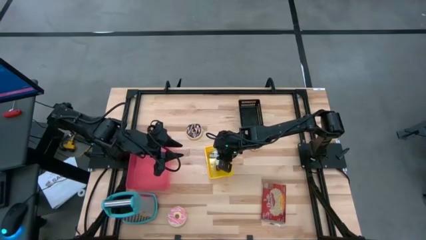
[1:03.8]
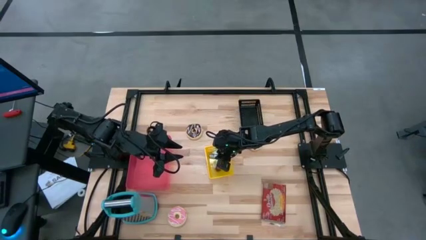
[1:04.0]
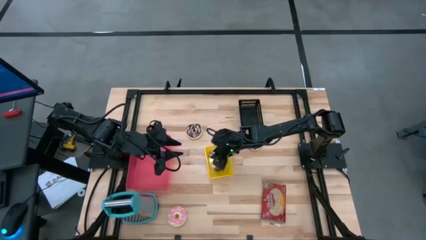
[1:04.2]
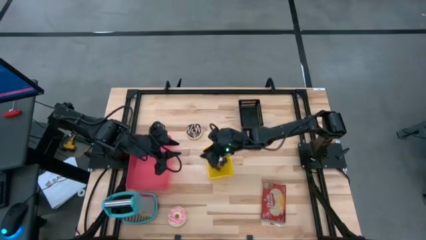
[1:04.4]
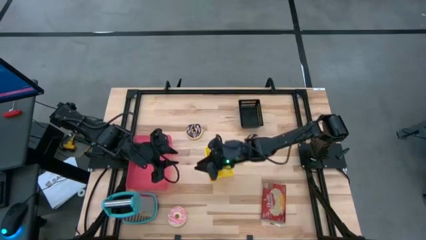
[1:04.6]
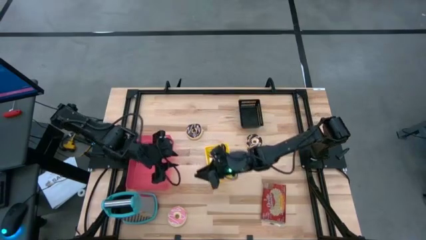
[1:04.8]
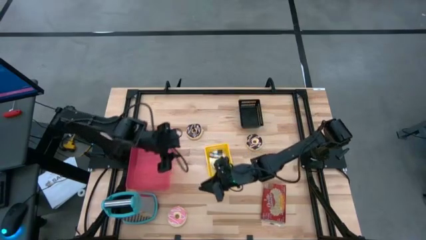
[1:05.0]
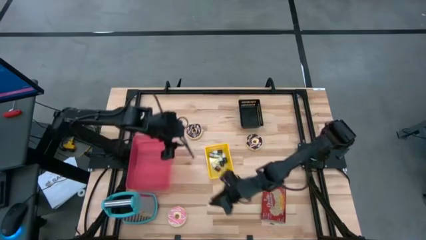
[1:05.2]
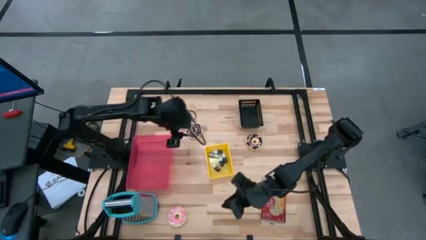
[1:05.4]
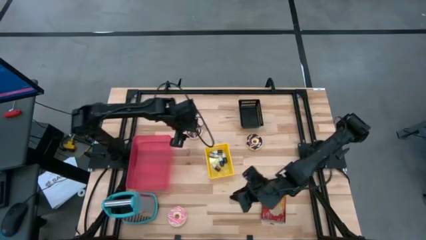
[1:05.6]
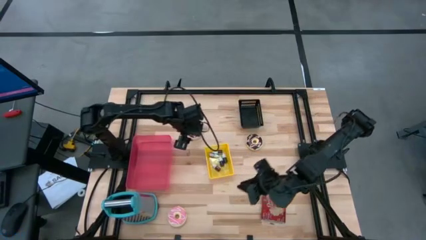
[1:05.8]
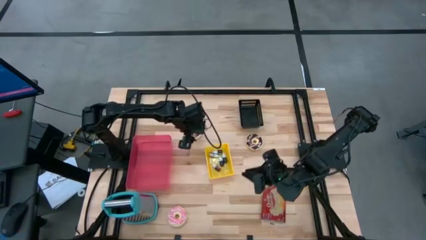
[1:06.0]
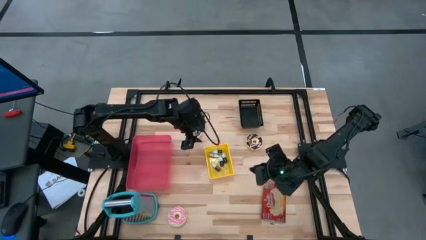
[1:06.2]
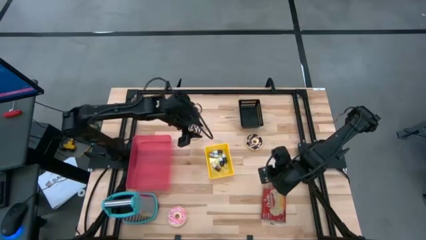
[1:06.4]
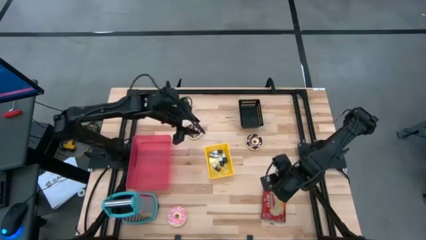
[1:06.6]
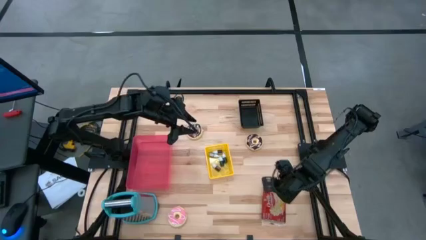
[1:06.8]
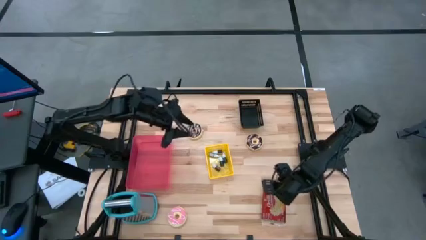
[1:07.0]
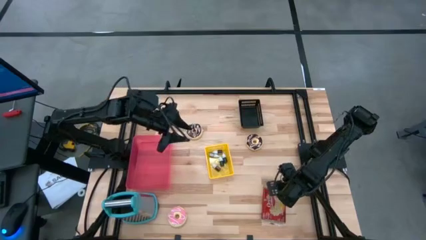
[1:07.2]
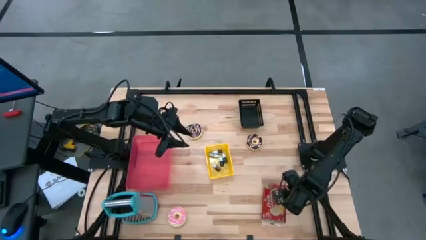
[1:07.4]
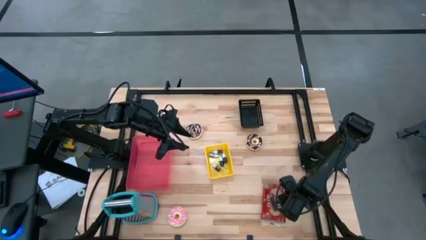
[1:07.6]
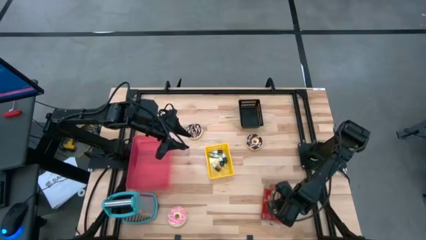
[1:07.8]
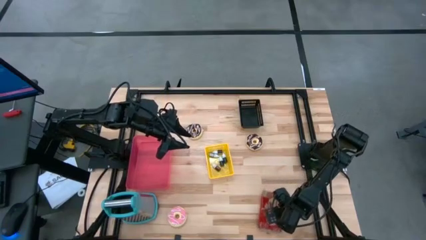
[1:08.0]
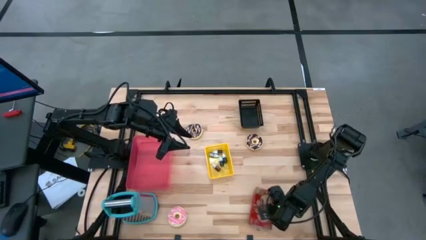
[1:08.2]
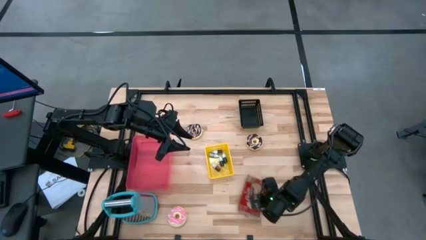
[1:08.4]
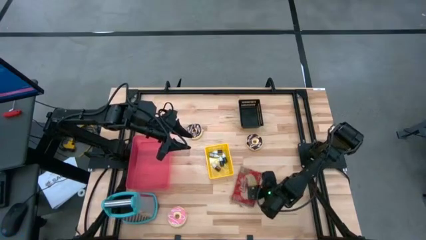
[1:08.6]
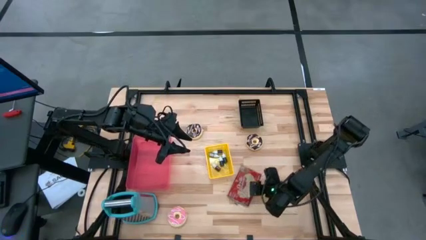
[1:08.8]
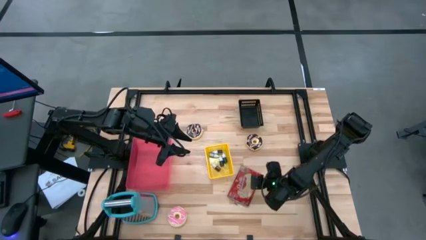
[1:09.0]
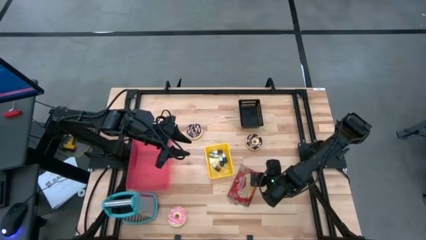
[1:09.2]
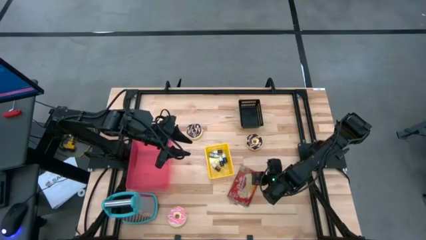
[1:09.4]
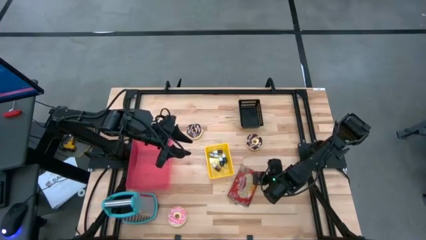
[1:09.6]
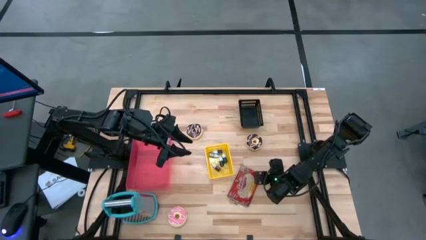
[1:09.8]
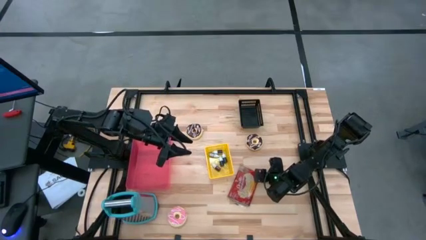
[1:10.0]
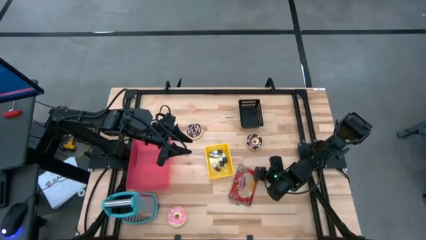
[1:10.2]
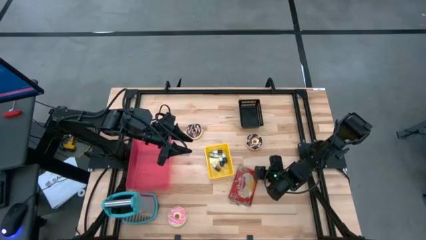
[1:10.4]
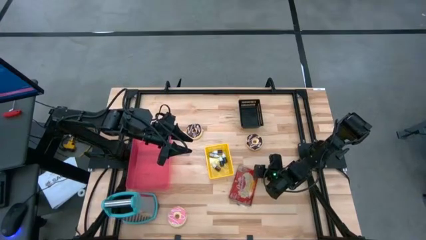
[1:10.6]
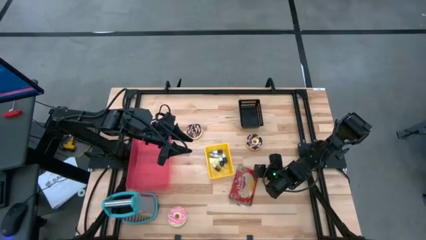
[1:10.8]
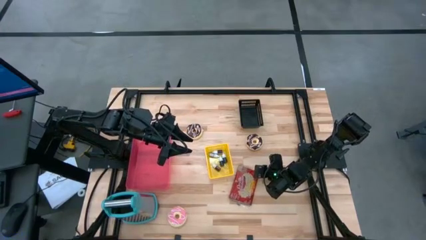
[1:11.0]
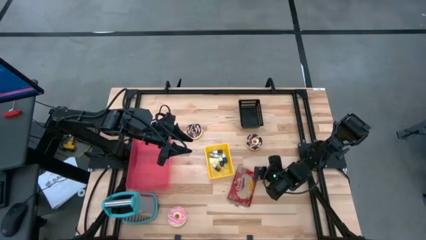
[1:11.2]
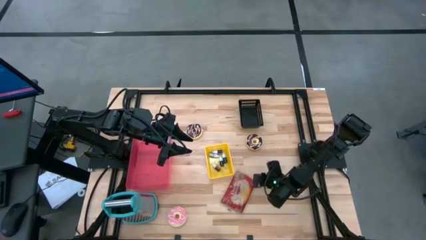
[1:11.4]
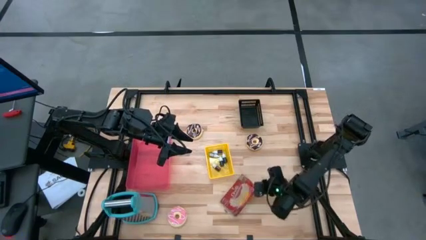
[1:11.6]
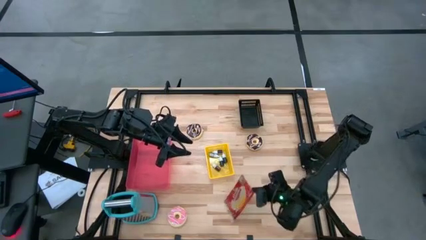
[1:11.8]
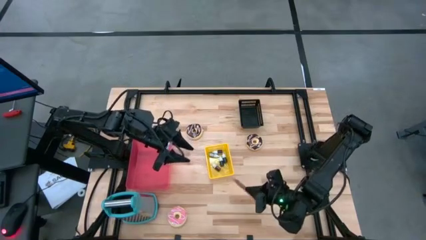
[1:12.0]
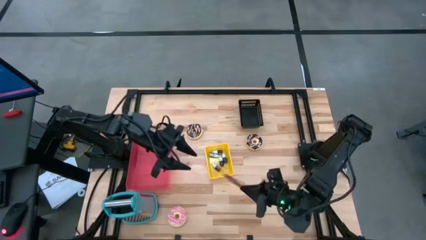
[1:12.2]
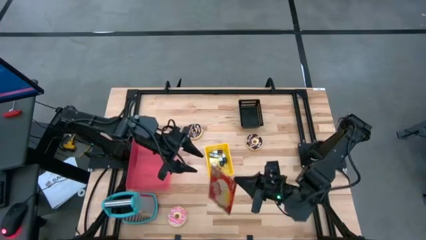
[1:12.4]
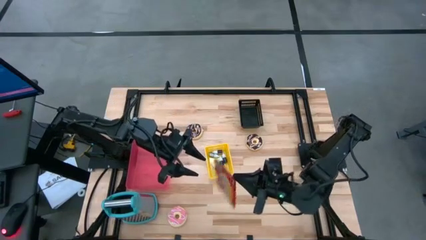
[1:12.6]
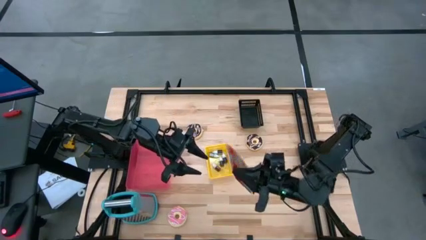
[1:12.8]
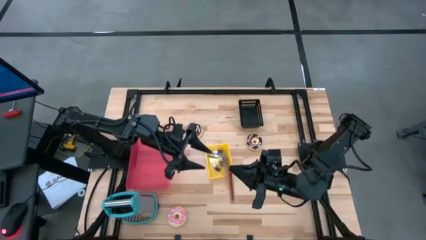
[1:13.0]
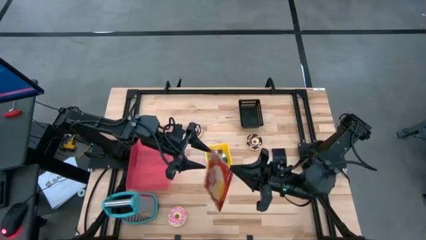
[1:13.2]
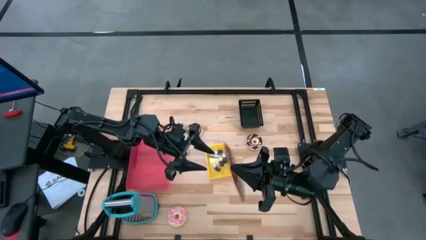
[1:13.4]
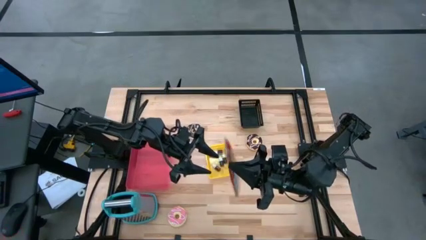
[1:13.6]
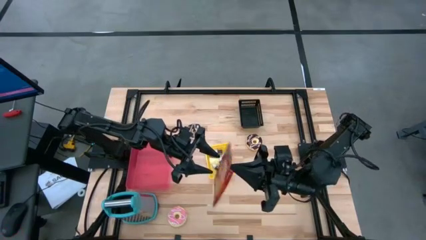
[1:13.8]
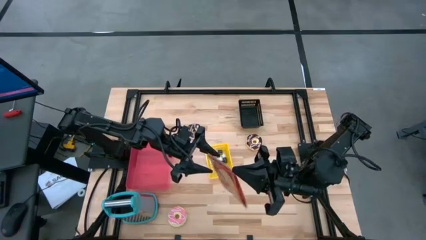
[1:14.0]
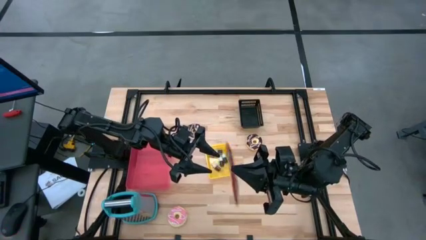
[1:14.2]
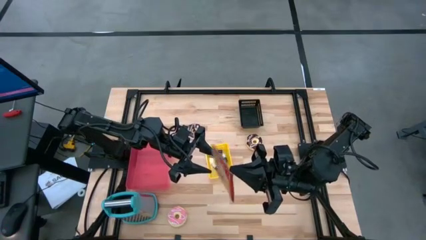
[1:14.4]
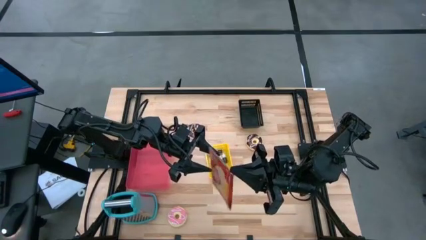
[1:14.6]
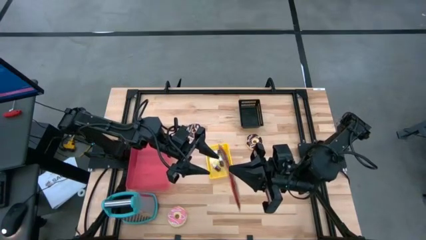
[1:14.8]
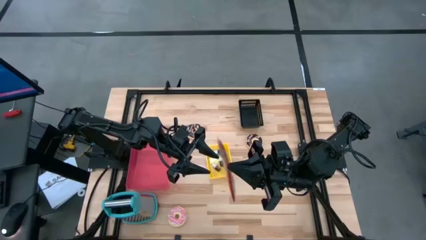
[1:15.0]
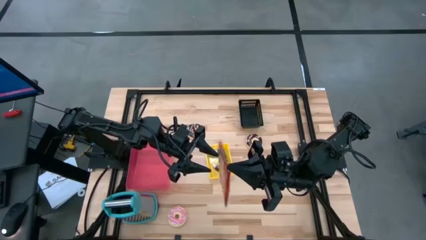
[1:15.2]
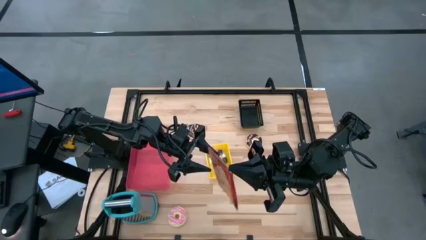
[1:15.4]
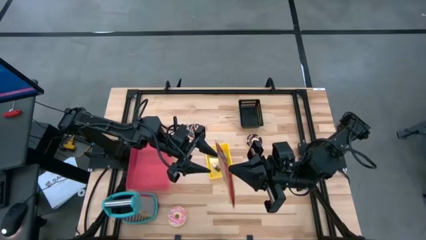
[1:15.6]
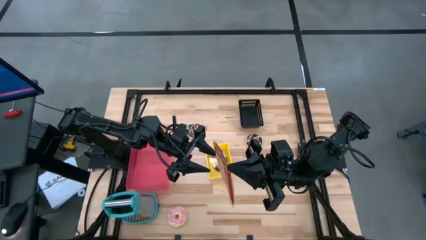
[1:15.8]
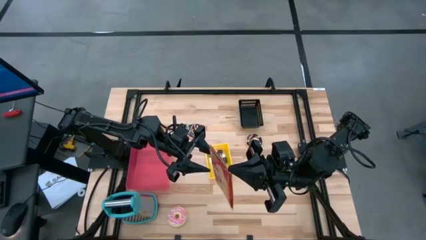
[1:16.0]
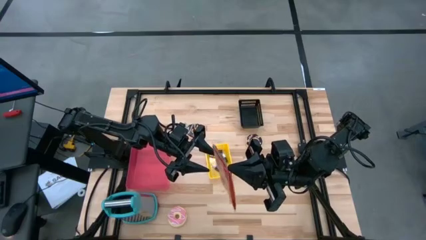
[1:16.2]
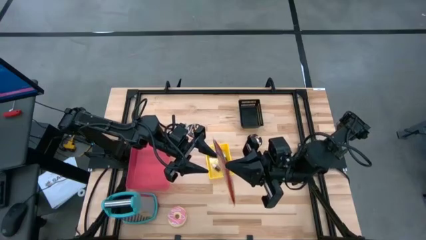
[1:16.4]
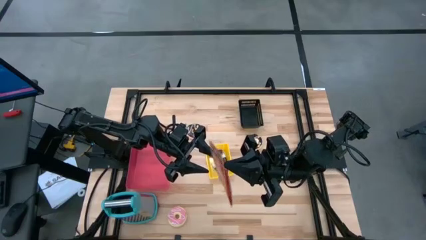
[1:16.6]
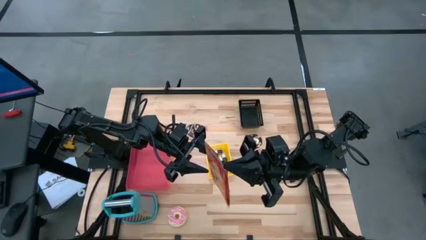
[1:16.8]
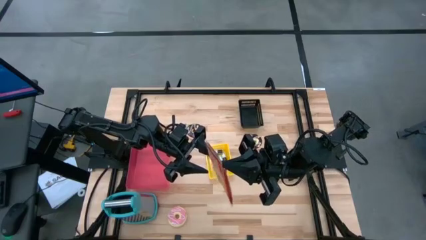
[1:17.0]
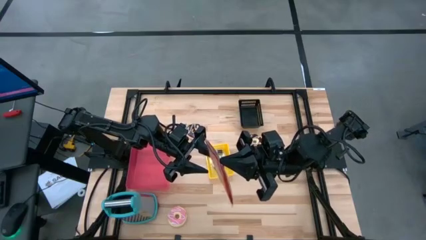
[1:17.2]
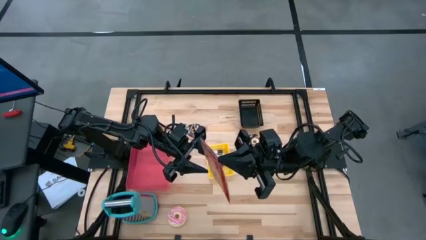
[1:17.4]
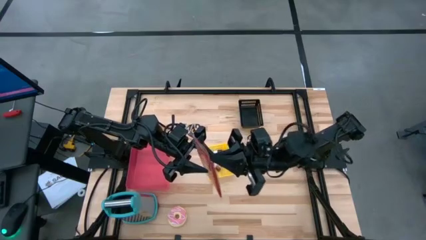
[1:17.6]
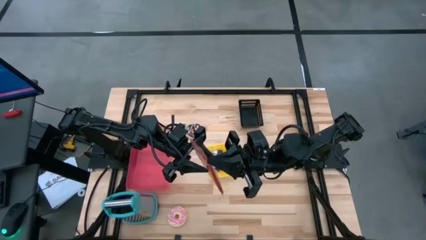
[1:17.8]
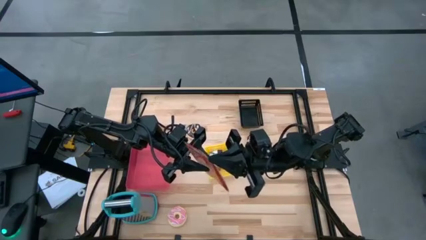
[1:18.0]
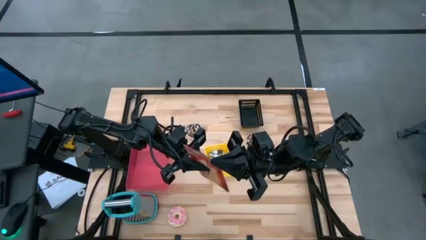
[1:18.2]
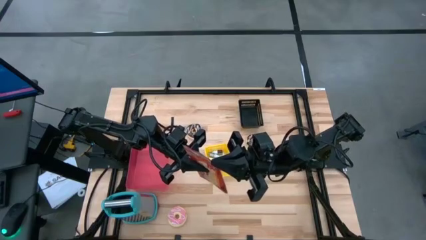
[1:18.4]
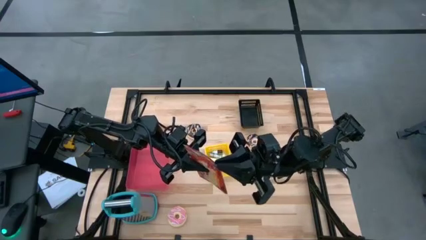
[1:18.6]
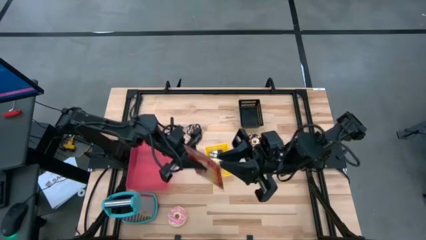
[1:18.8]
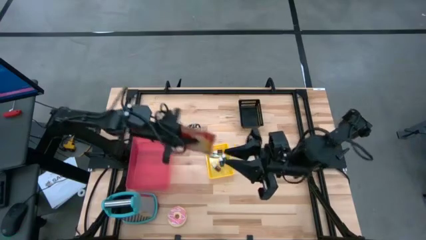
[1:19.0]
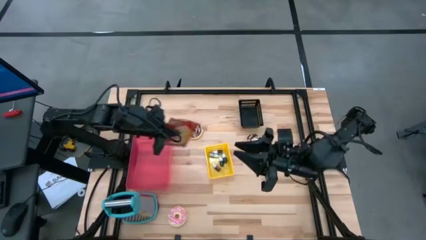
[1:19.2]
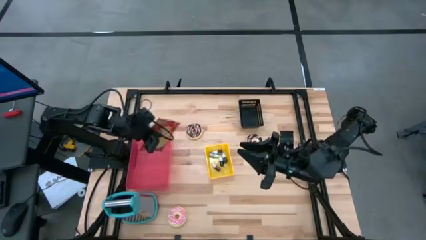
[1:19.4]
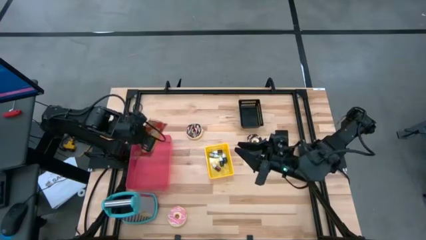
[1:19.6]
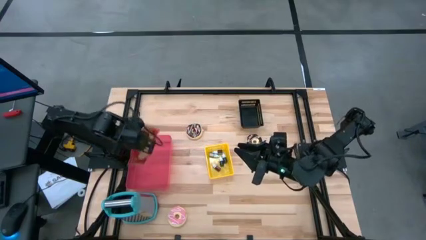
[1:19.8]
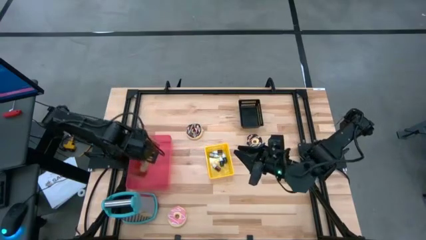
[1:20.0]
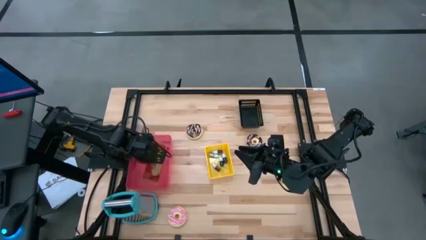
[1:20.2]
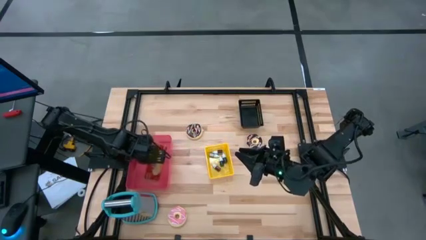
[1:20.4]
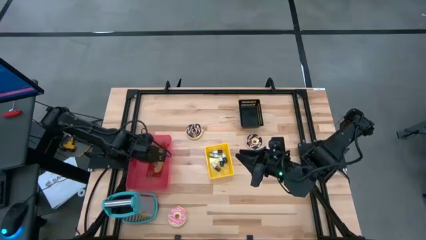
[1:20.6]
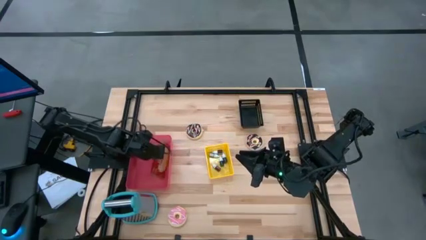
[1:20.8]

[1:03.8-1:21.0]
Put the red popcorn bag into the pink bin
